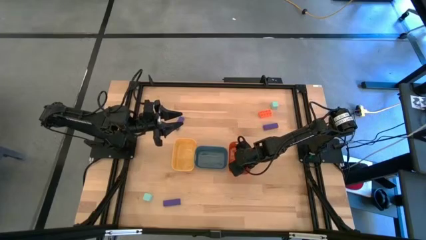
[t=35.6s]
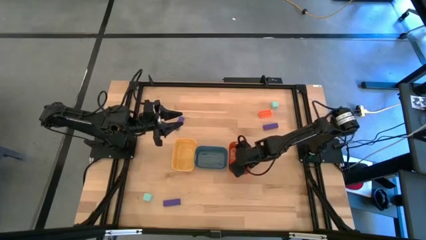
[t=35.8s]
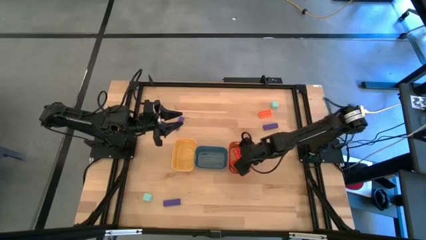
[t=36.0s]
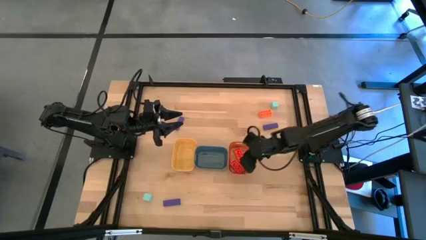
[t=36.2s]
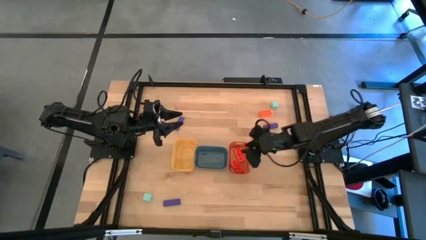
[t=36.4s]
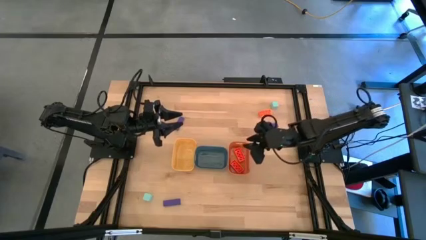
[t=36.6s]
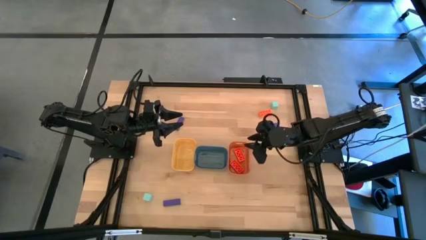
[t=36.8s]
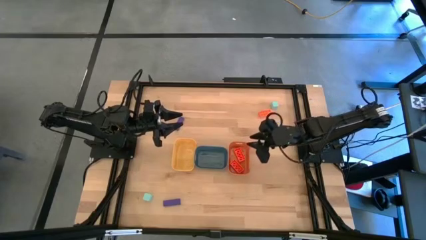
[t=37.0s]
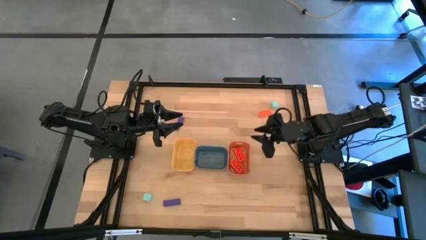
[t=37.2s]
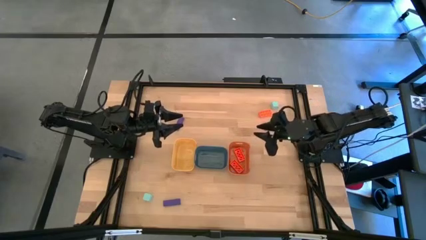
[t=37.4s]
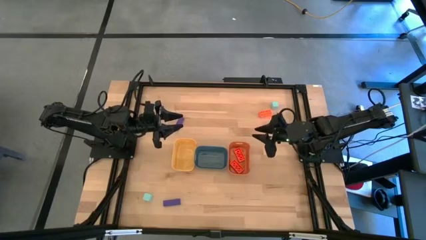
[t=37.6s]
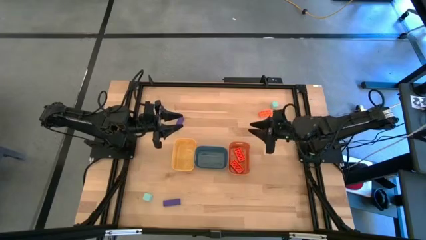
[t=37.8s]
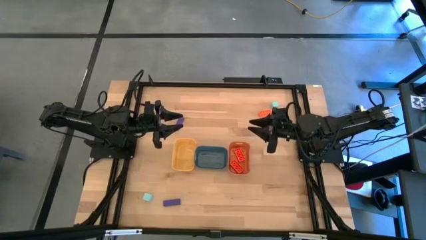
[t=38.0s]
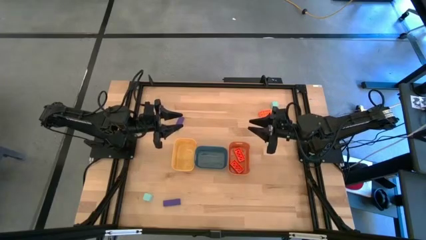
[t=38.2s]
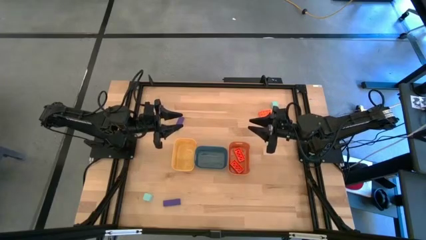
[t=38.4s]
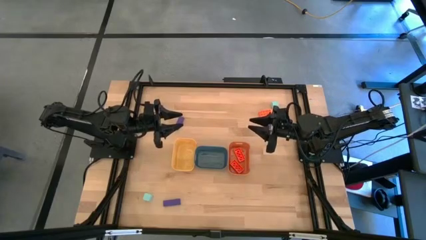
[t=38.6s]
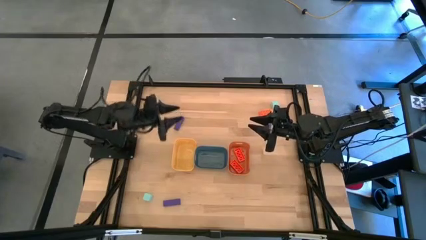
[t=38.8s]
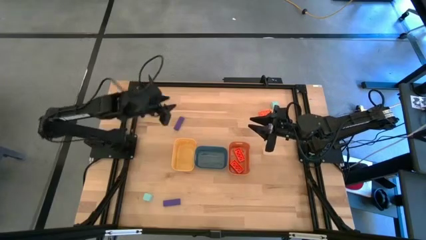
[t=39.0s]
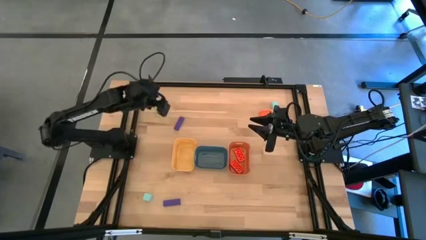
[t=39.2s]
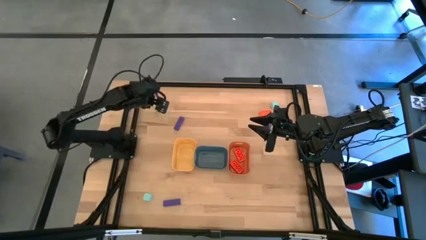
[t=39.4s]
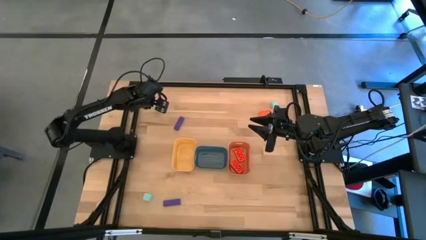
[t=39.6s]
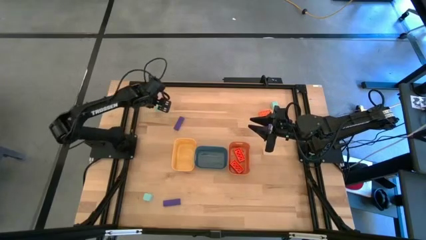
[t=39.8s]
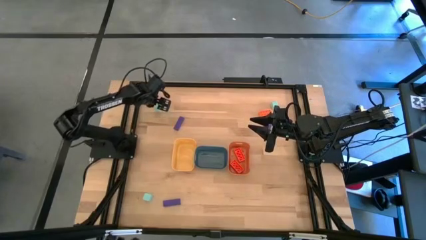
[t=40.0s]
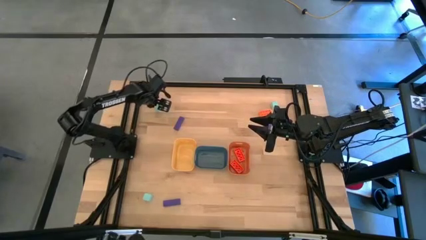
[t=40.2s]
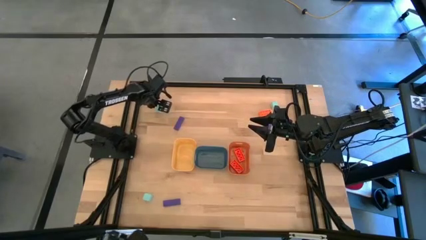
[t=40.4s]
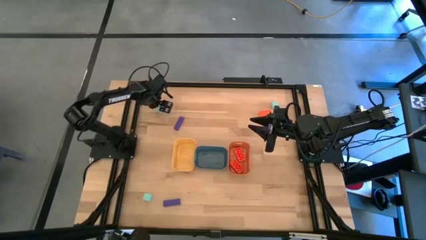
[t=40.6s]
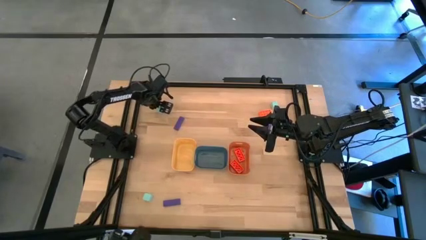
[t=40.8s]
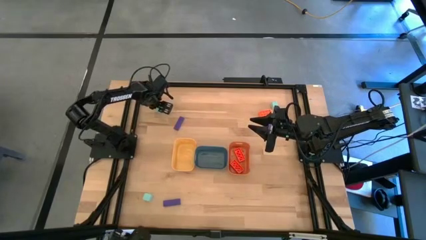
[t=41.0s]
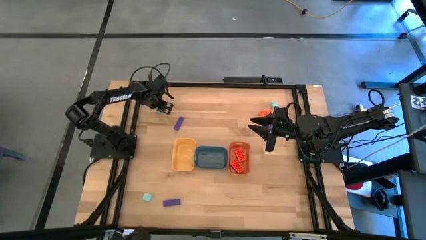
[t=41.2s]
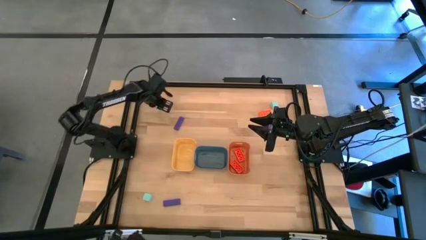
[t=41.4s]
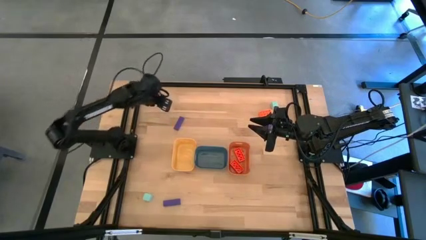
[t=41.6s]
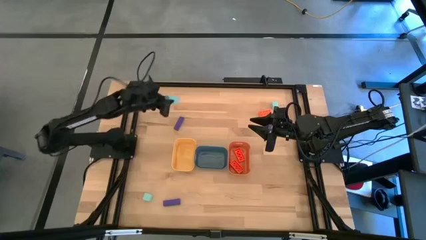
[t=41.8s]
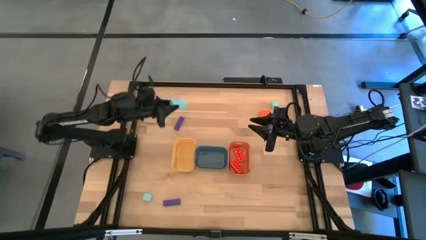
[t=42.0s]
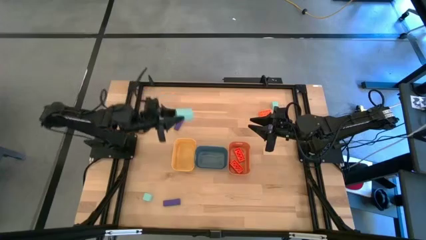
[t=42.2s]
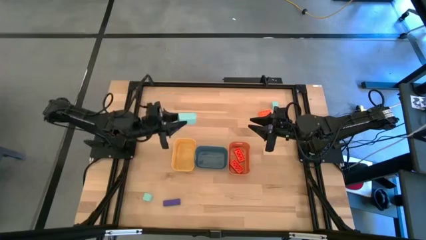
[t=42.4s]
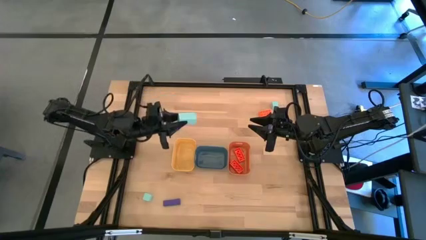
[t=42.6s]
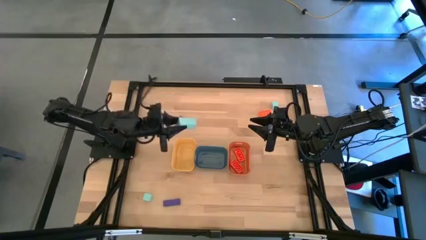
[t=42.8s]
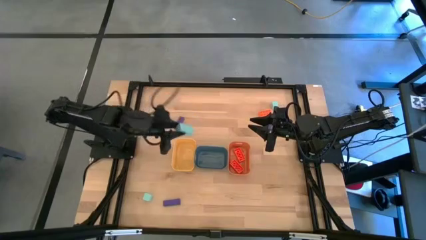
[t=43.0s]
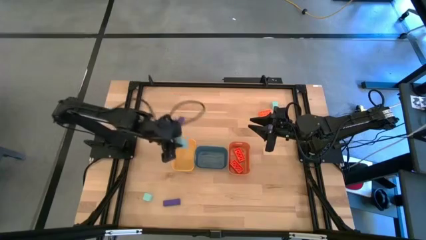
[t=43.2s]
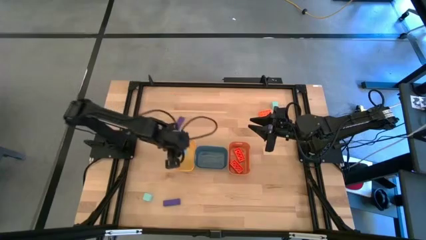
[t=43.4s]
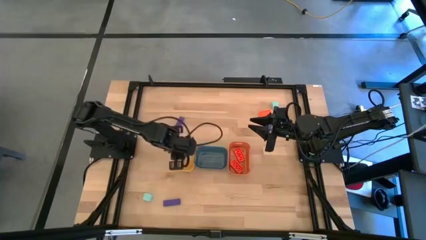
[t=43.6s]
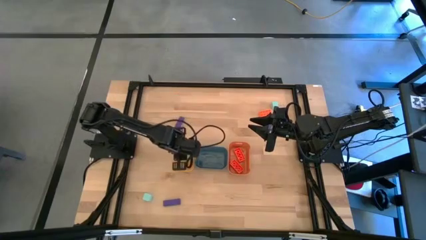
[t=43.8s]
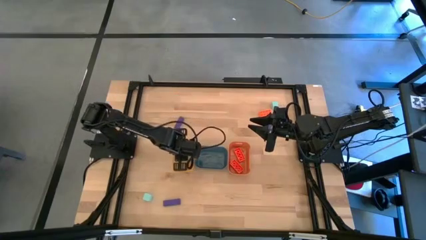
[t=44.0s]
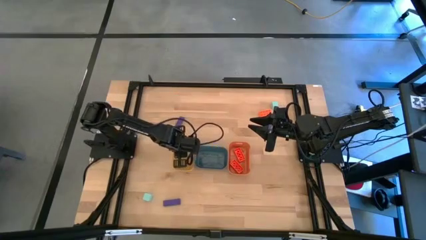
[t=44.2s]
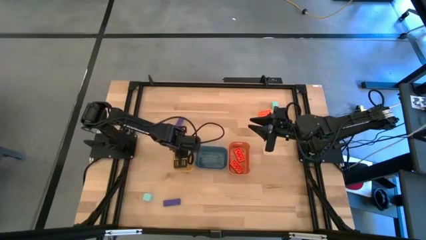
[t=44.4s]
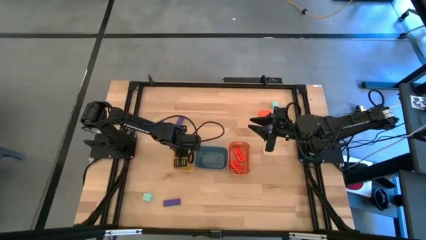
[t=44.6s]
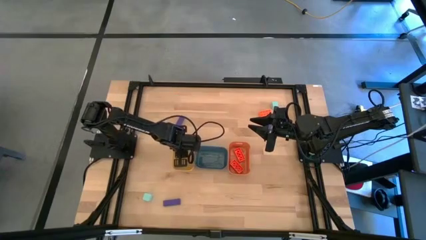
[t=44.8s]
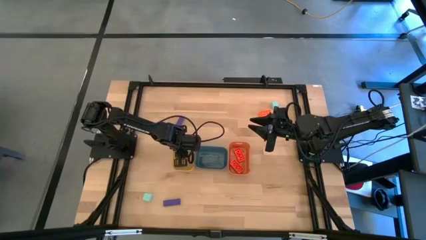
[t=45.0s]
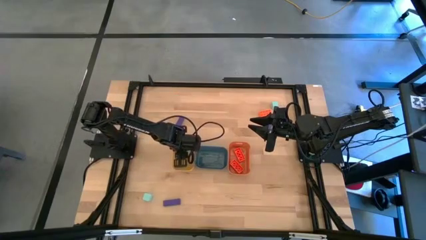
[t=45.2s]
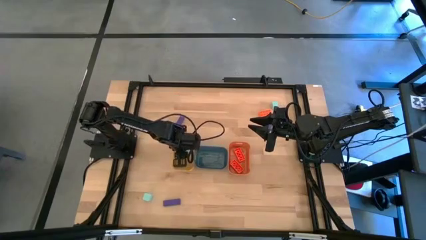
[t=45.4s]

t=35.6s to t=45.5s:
Task: Sort & place blocks by color
Put the top left blue block into the yellow bin

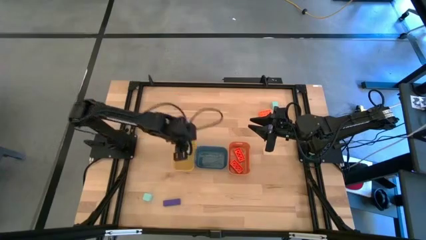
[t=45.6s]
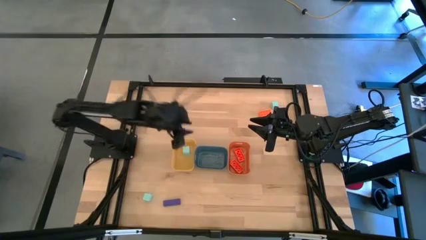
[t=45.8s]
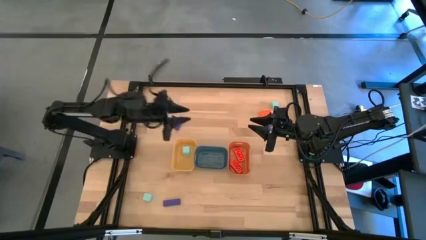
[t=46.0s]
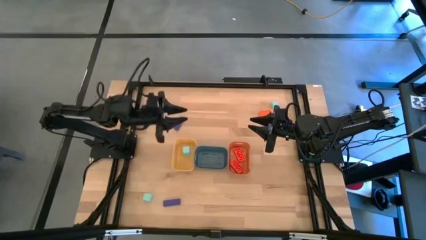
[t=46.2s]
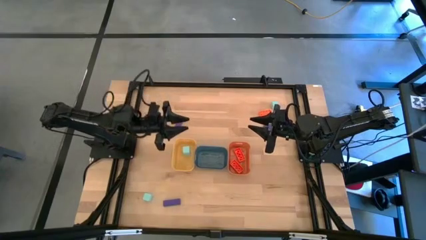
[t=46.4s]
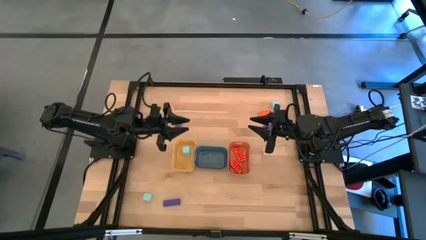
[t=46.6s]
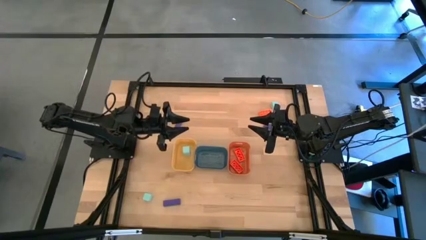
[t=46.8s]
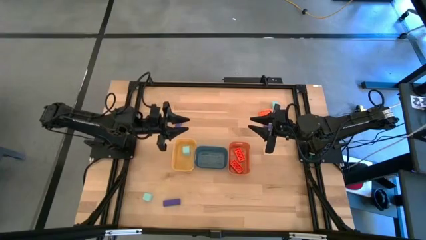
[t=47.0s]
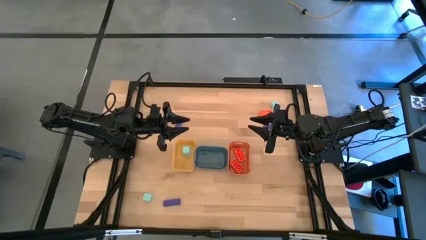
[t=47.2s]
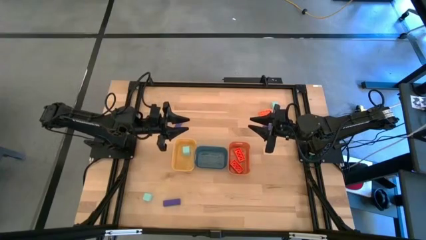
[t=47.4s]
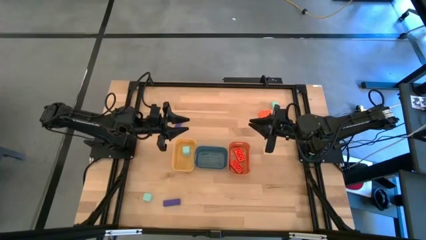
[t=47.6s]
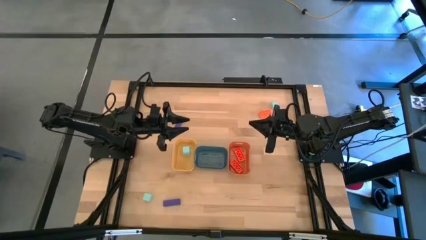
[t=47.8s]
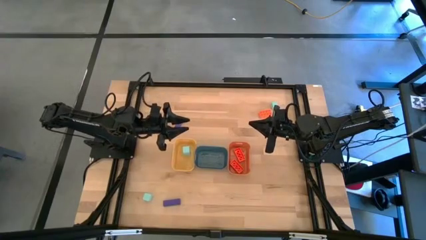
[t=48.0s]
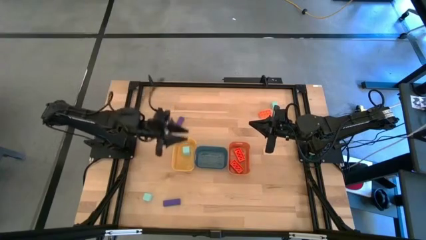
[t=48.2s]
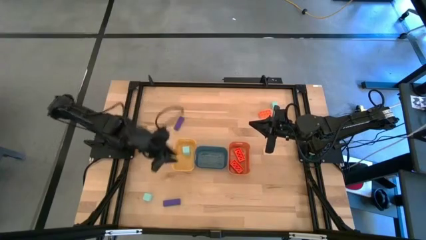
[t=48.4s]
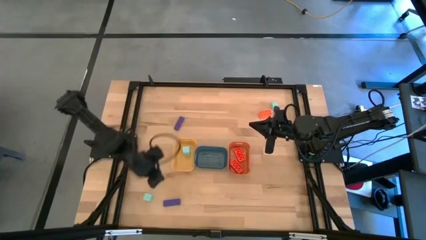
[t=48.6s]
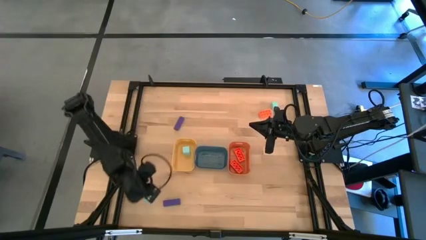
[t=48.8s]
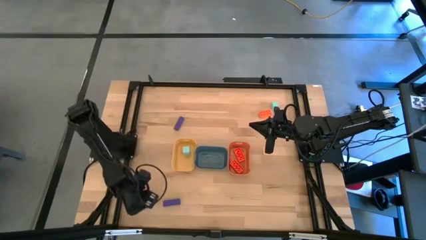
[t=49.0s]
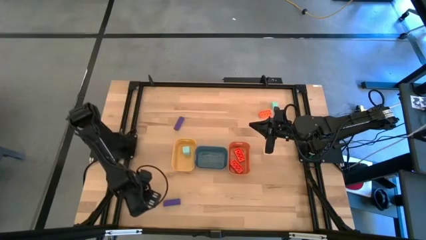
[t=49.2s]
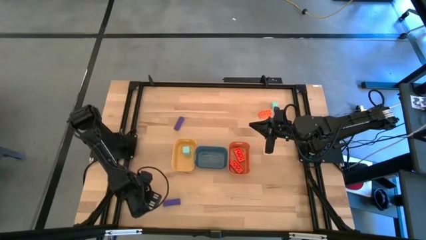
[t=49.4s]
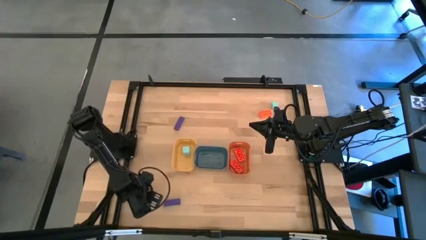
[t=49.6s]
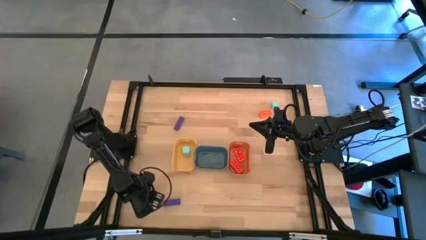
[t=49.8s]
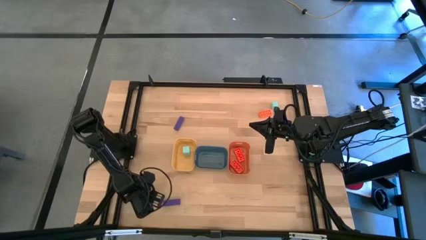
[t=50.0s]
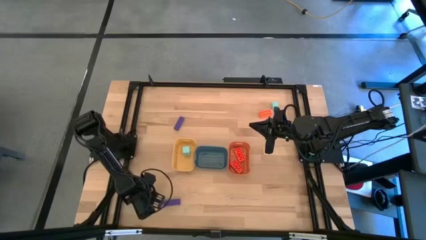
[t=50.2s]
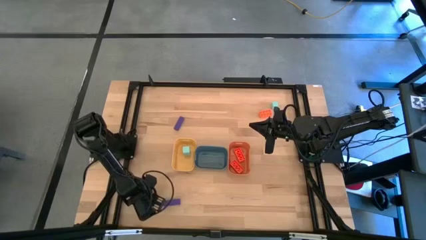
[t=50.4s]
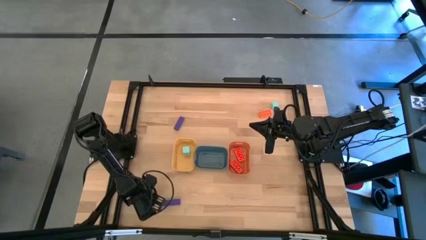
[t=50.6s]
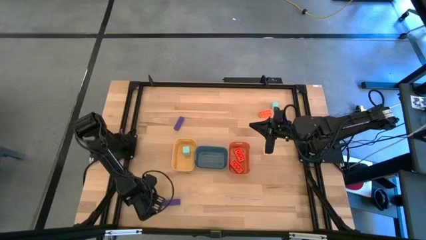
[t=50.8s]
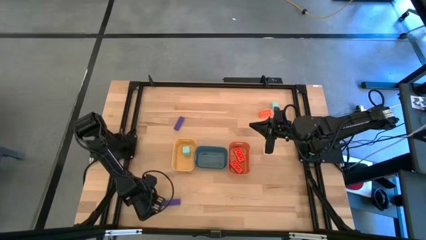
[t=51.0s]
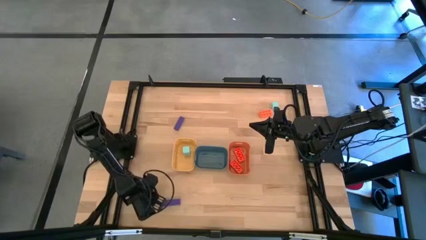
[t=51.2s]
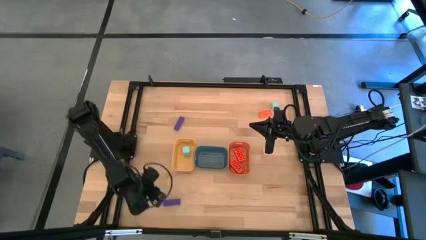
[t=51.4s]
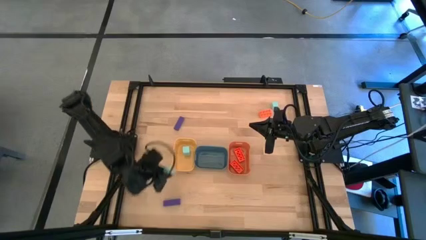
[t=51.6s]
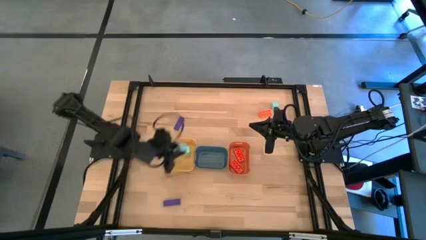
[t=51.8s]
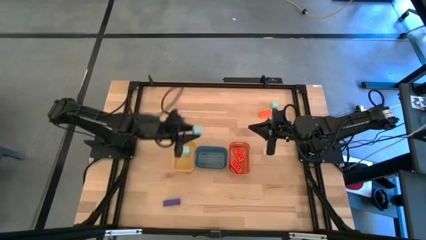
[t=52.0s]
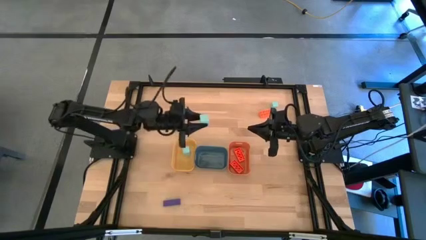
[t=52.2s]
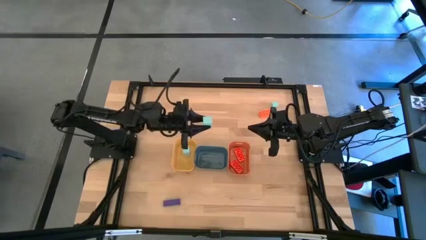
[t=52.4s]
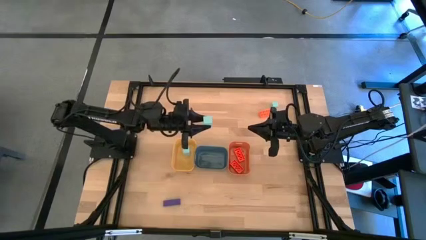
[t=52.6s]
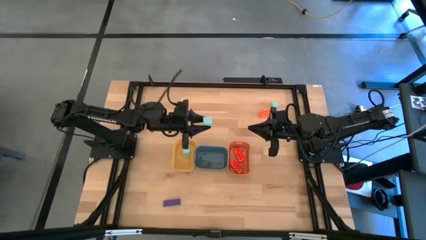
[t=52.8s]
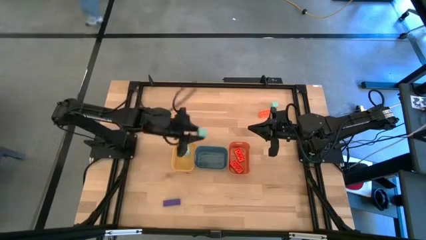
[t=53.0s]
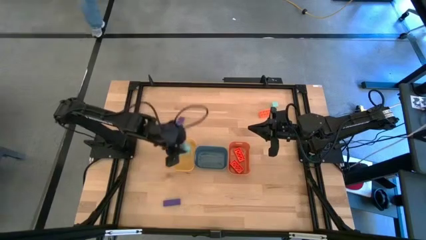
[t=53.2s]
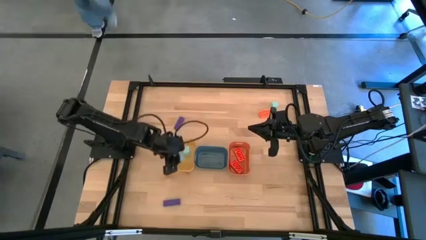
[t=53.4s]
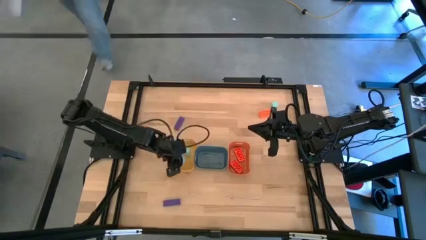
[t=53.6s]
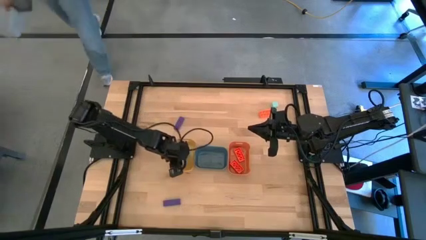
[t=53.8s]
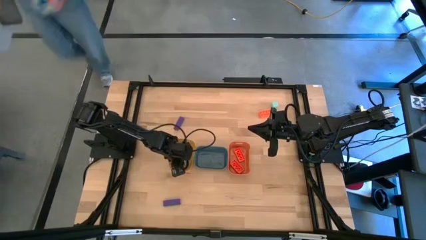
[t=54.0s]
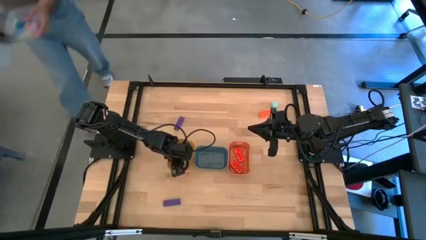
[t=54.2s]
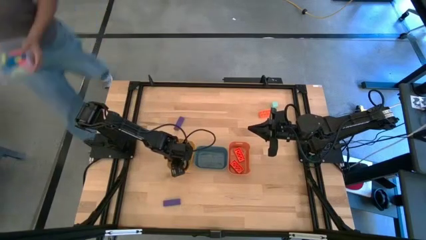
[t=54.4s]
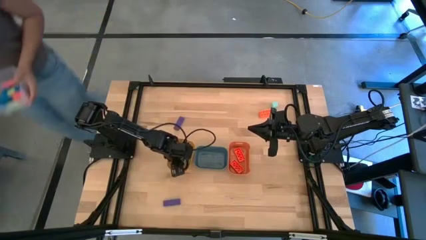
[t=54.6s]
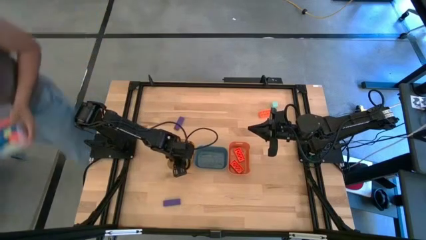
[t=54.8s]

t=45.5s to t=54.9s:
Put the bottom blue block into the yellow bin
